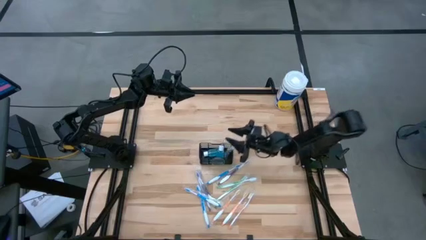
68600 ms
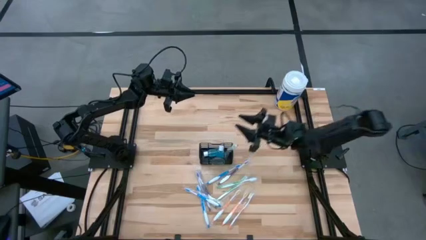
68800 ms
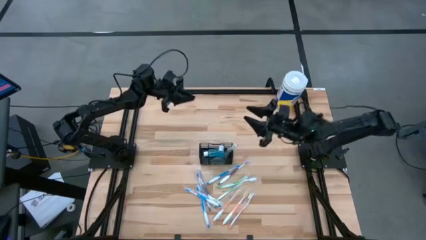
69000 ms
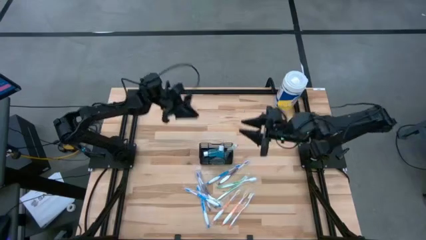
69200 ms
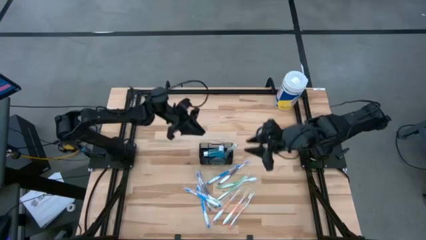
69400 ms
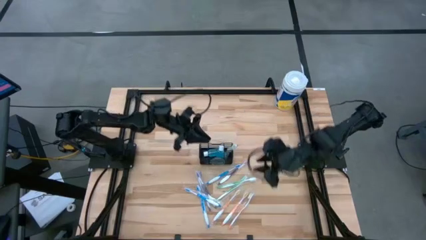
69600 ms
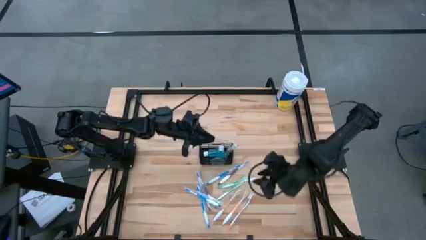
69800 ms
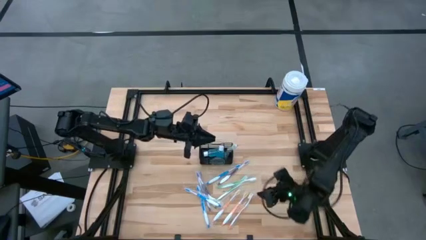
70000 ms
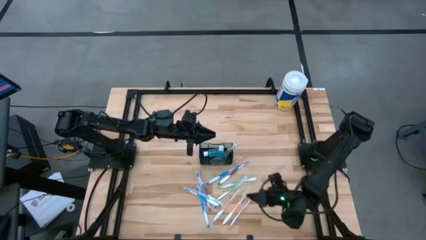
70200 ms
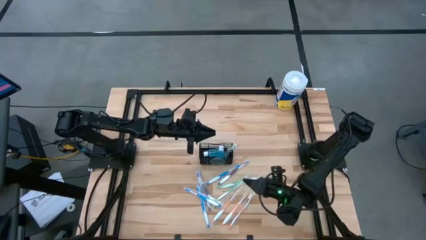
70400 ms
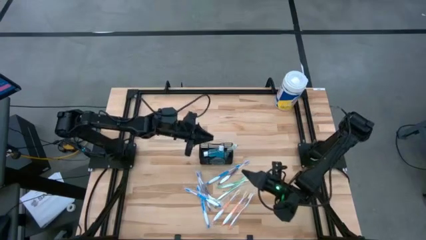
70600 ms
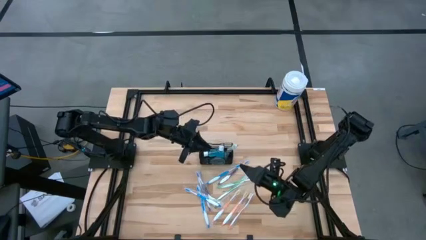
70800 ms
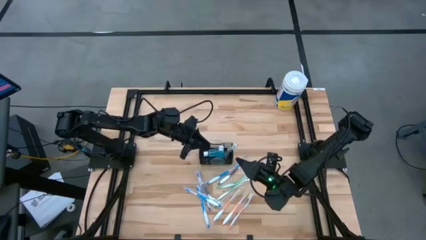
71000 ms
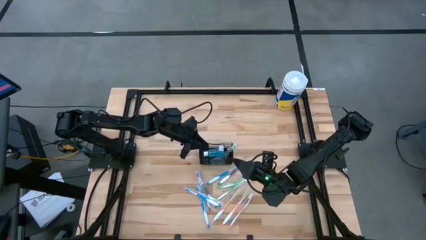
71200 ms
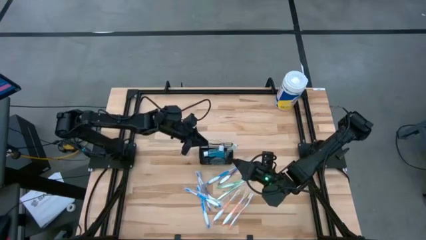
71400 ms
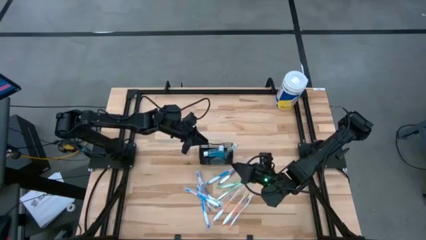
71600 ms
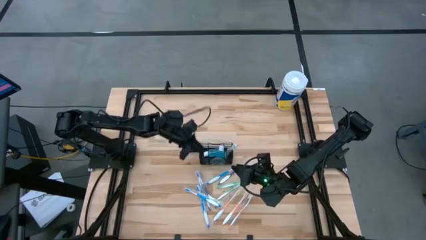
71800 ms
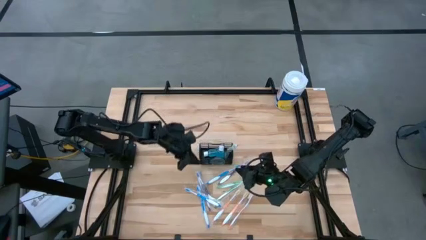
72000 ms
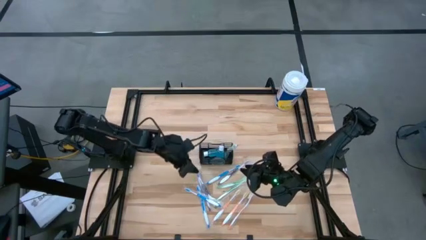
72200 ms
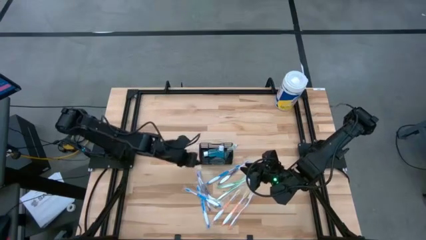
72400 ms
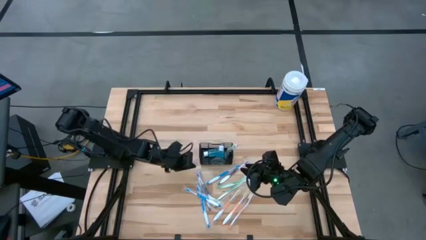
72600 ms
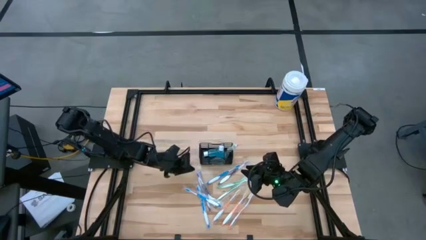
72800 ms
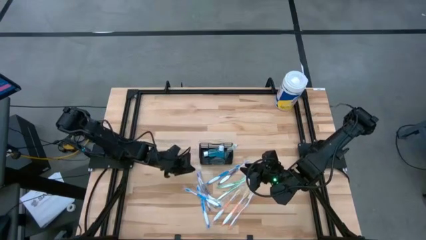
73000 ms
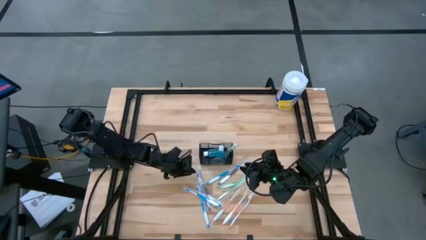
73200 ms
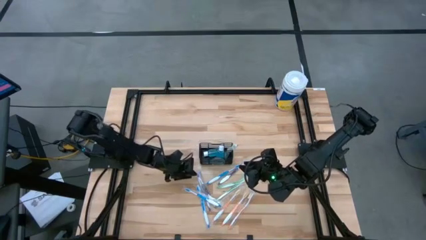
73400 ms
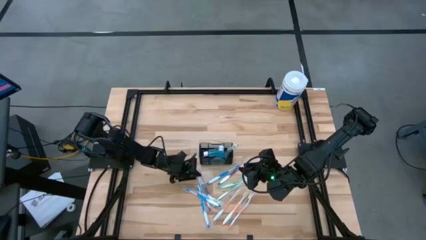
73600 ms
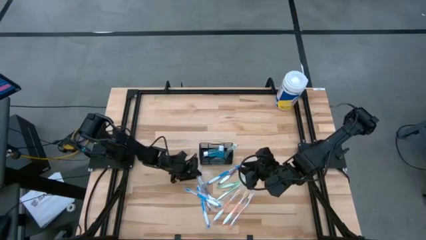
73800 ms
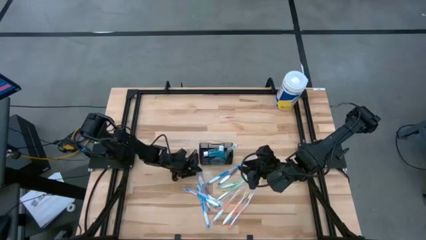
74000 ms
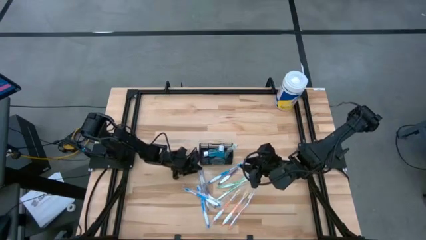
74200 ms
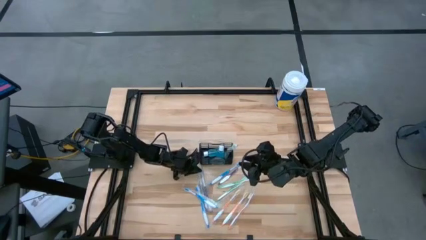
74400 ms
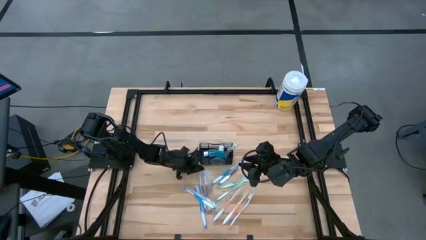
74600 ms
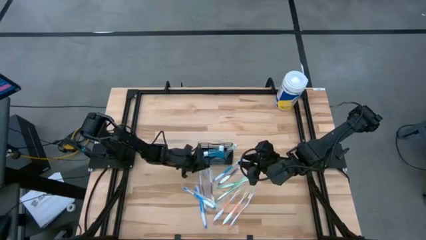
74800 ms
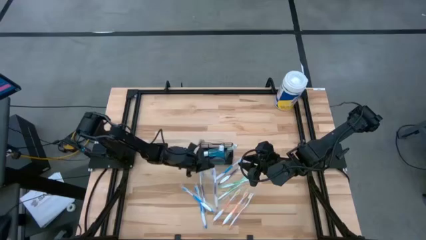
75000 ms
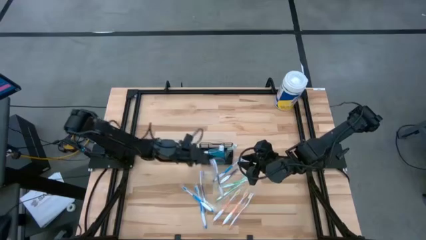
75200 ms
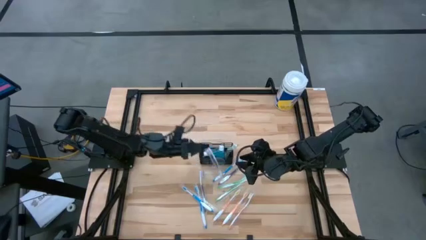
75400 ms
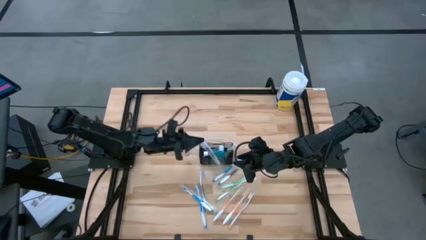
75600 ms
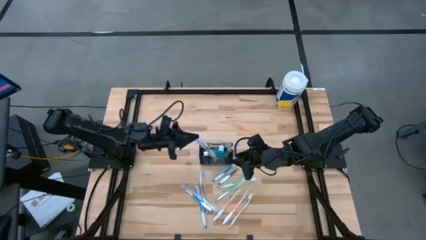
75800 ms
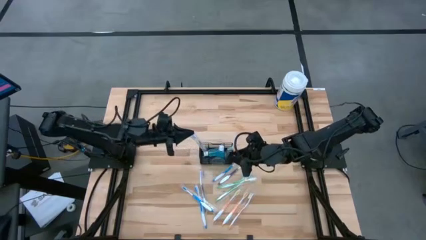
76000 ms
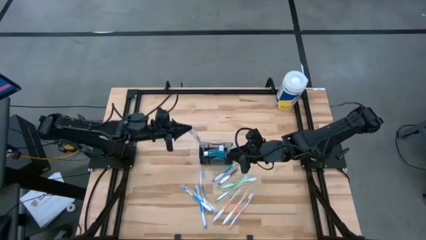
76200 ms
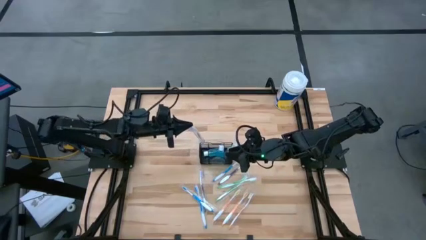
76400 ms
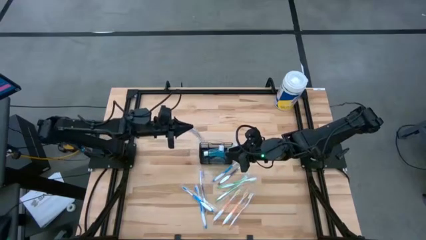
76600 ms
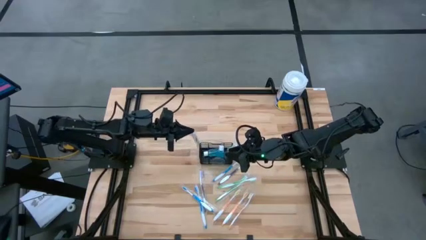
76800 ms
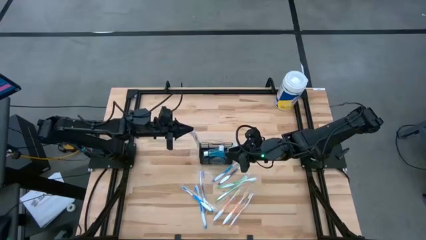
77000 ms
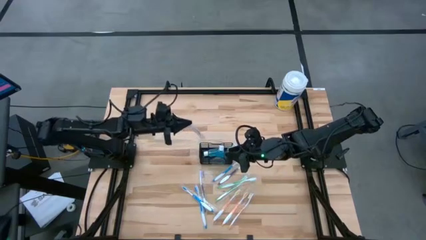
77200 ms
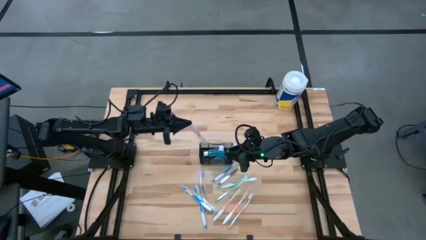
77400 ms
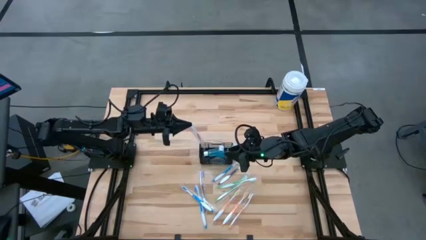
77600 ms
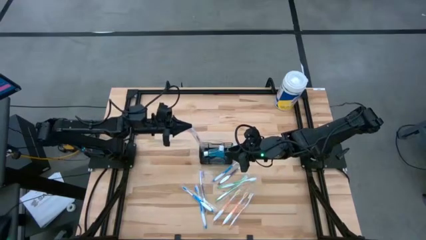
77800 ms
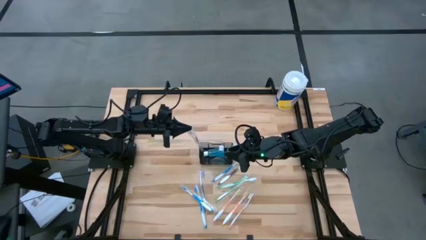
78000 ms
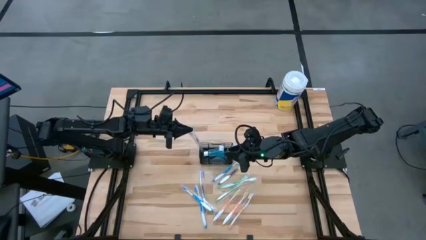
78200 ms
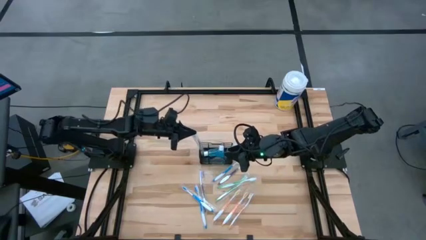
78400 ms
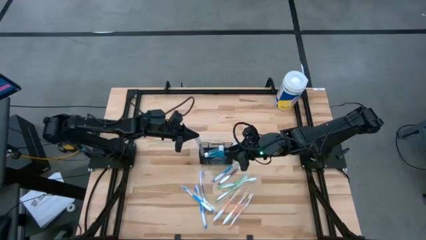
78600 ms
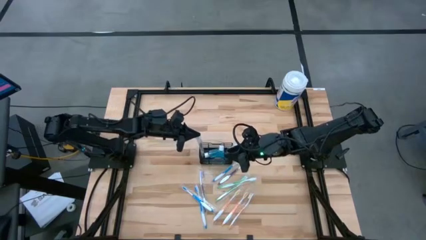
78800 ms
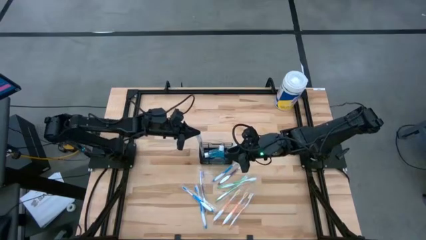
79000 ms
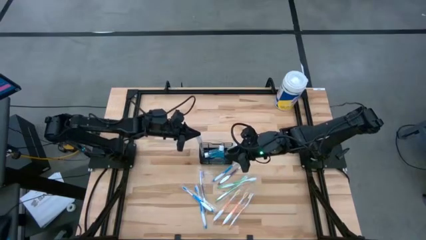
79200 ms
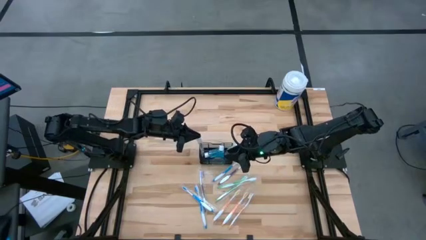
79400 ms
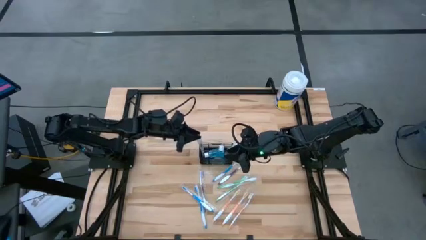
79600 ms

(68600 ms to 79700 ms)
Task: Pick & Place toothbrushing station
Put the purple toothbrush into the black wire organizer

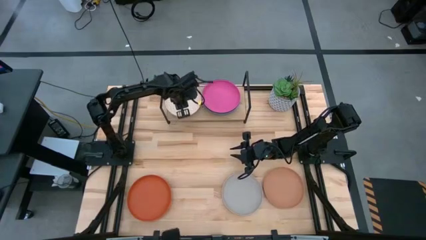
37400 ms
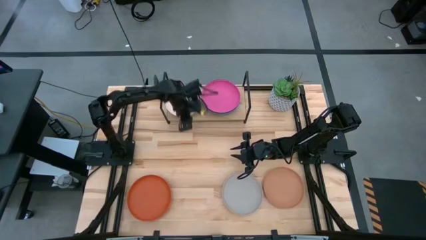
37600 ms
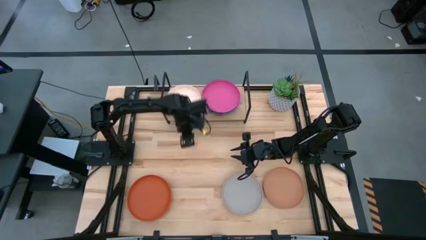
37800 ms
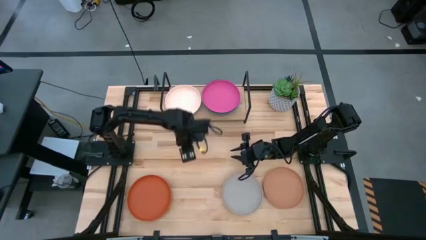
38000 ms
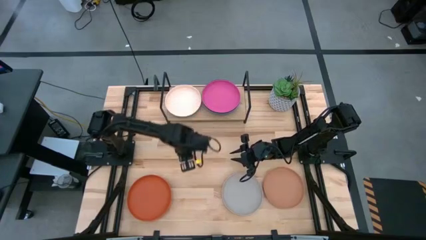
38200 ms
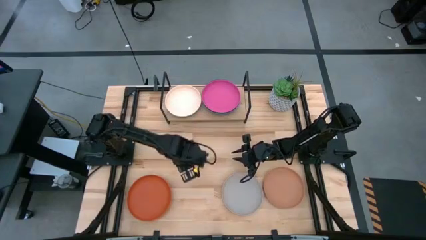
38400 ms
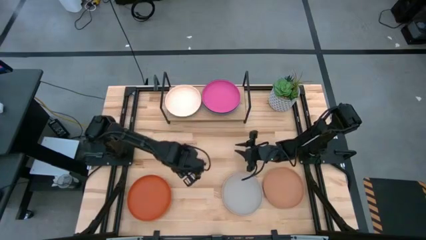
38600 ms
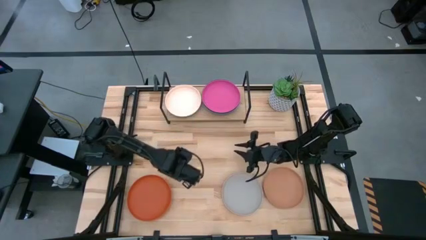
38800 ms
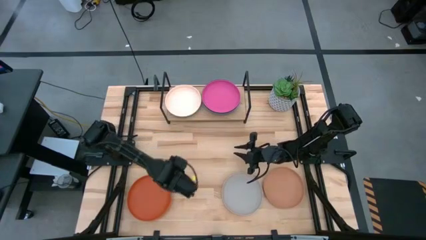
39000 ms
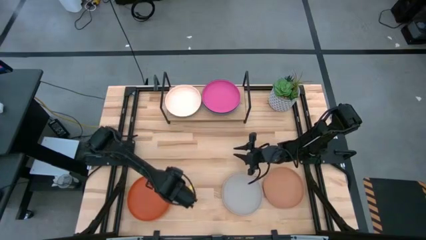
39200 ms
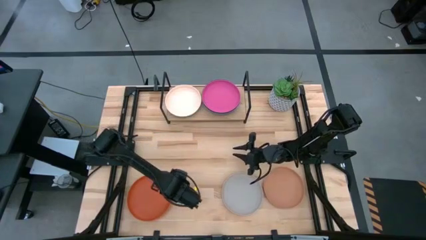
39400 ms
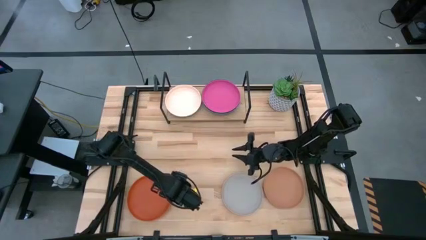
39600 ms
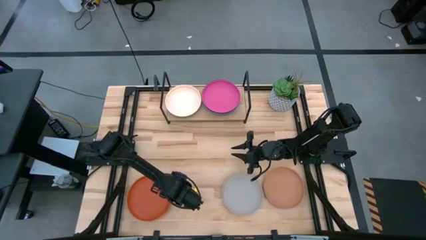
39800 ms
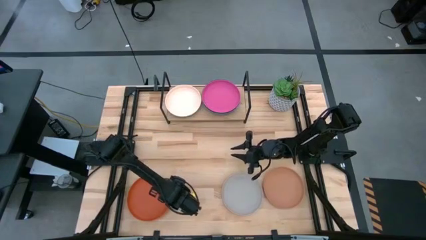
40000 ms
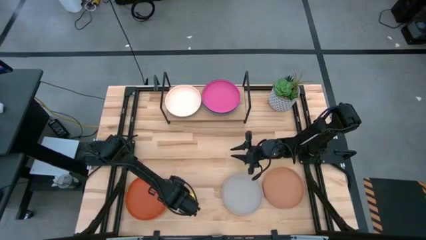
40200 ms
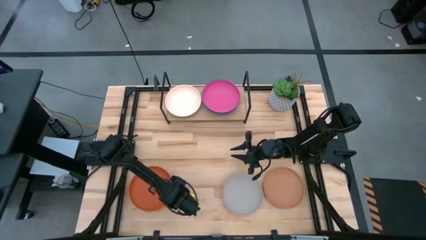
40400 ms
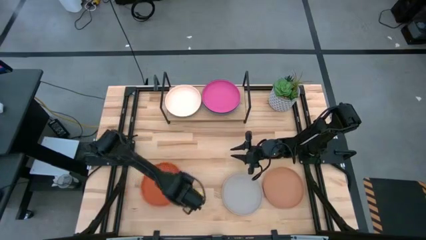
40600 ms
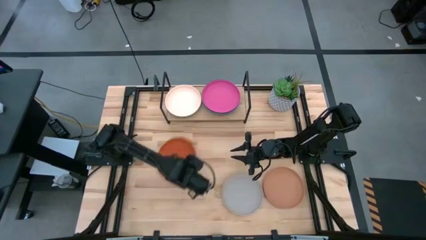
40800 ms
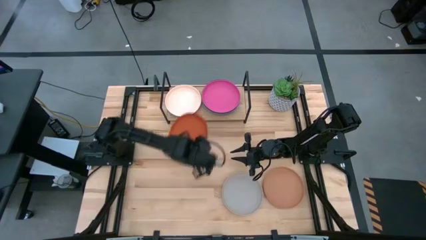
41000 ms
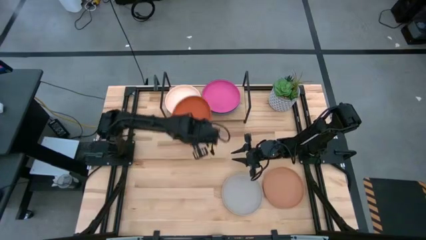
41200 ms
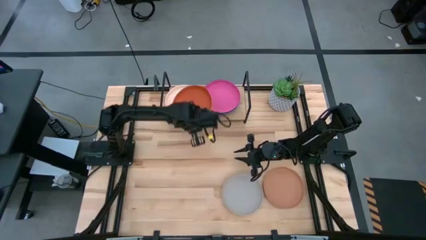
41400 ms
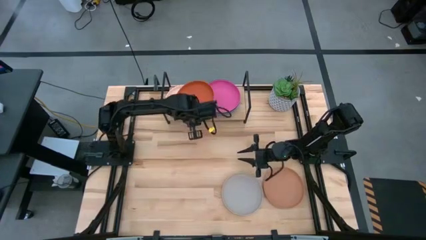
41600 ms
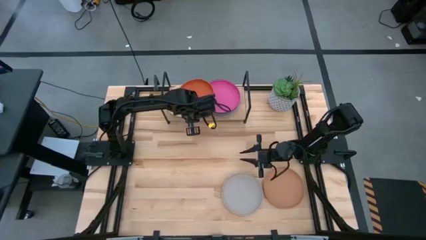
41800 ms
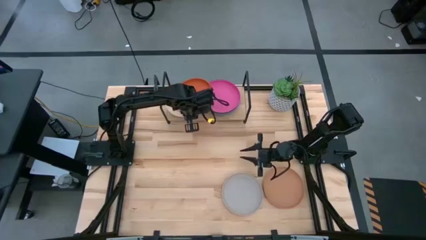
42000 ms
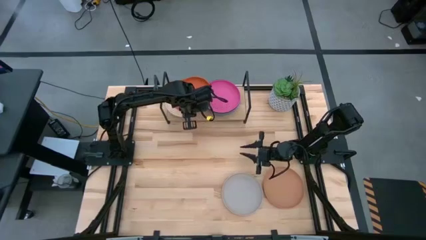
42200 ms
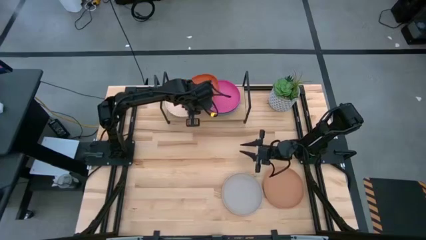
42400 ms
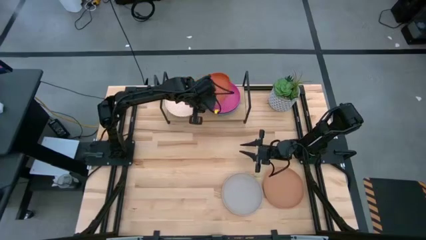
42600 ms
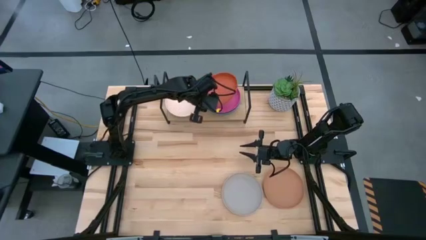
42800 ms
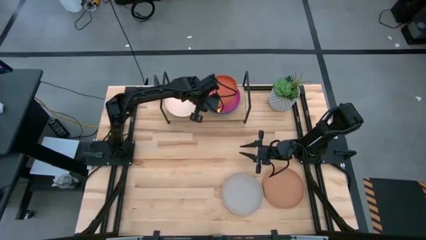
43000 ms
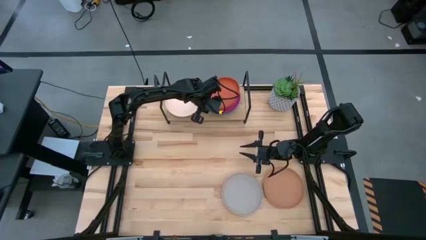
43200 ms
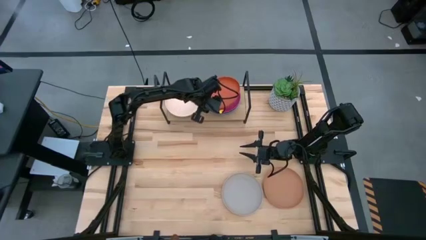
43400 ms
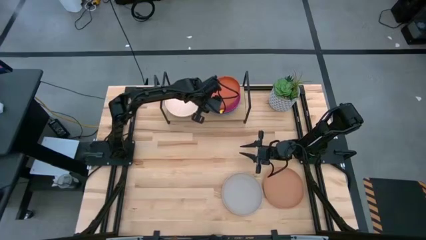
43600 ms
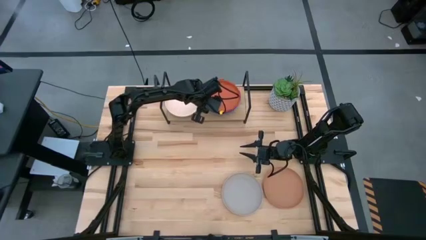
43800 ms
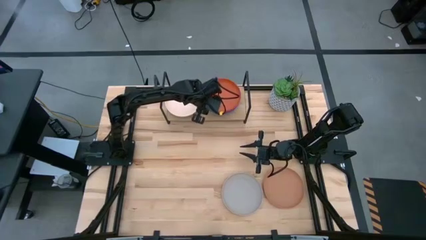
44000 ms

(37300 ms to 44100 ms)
Task: Place and stack plates onto a shelf
Stack the orange plate on top the pink plate on the shelf
